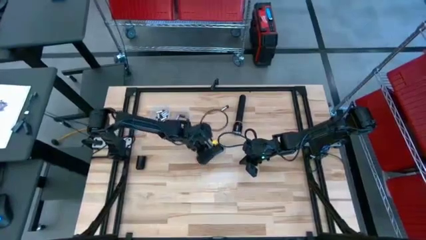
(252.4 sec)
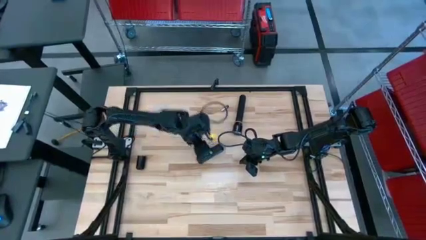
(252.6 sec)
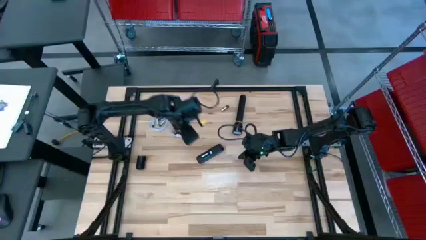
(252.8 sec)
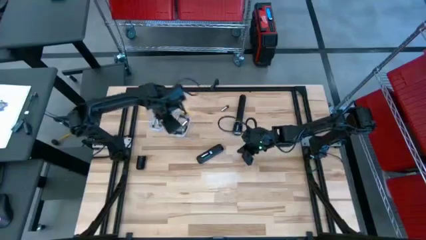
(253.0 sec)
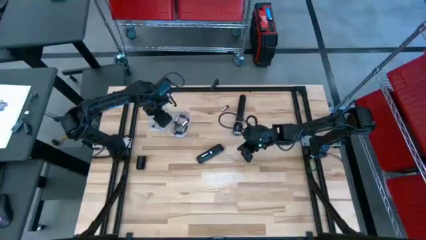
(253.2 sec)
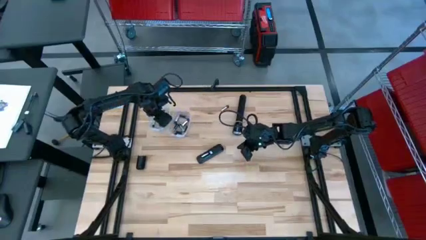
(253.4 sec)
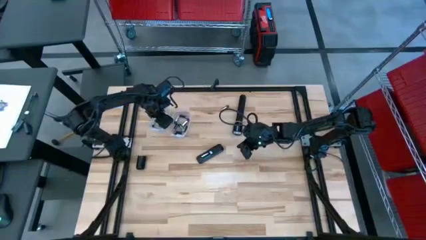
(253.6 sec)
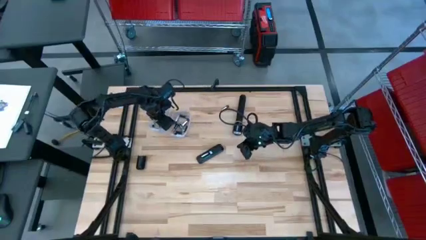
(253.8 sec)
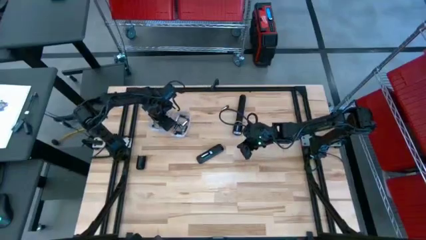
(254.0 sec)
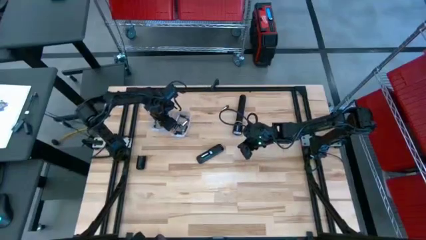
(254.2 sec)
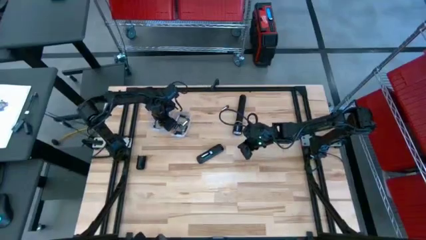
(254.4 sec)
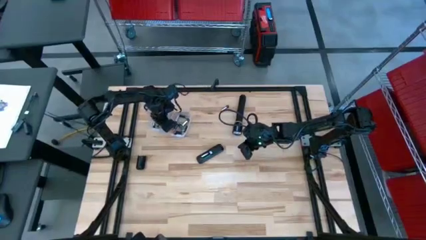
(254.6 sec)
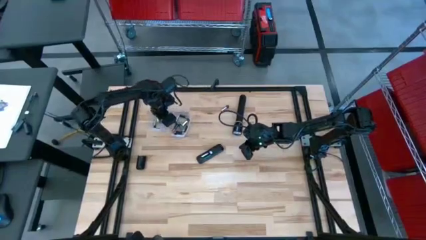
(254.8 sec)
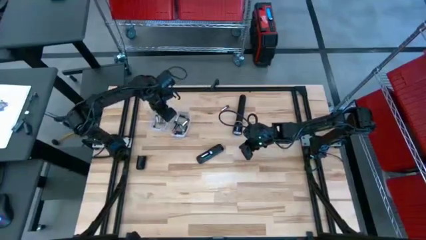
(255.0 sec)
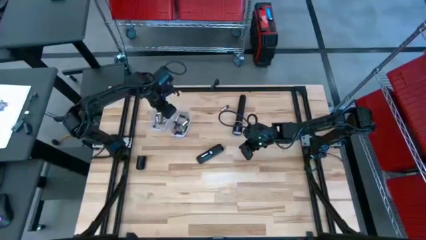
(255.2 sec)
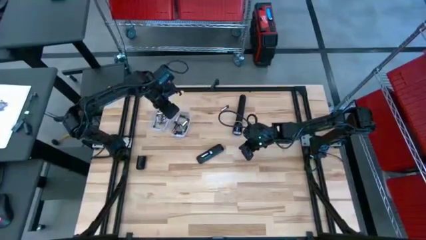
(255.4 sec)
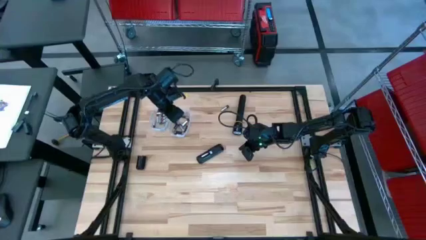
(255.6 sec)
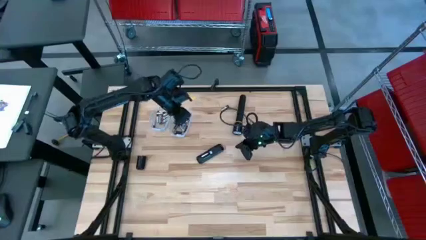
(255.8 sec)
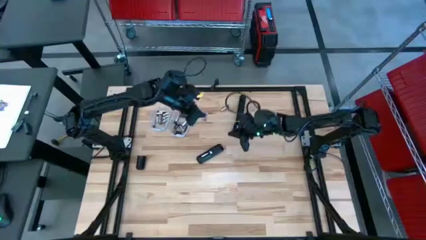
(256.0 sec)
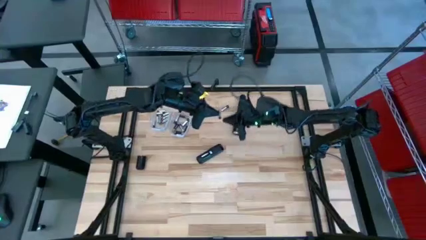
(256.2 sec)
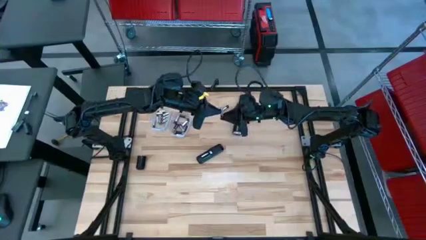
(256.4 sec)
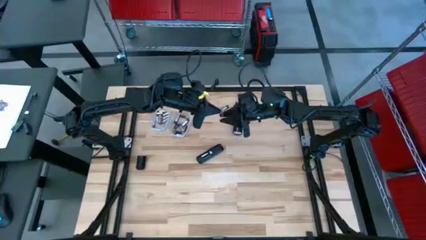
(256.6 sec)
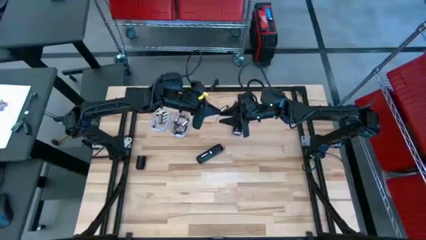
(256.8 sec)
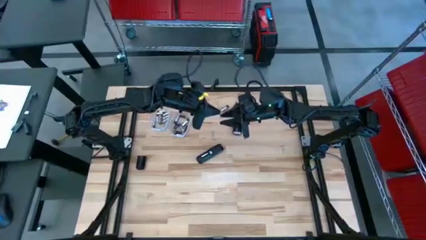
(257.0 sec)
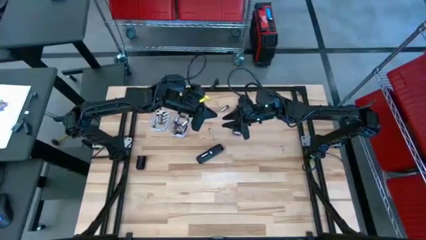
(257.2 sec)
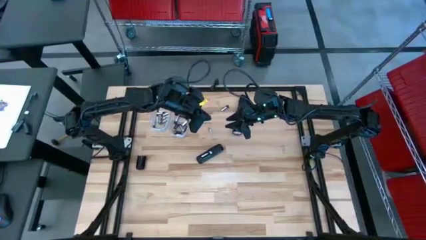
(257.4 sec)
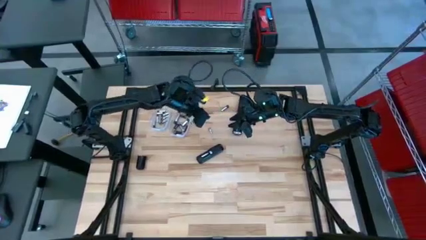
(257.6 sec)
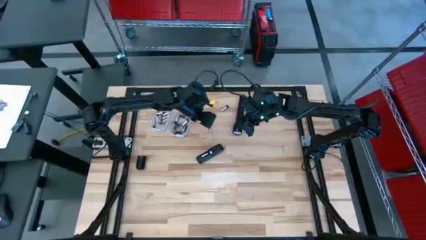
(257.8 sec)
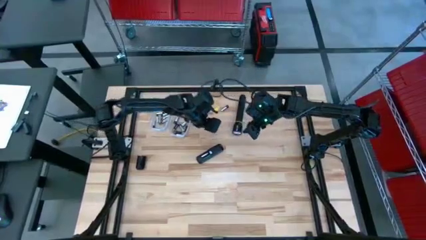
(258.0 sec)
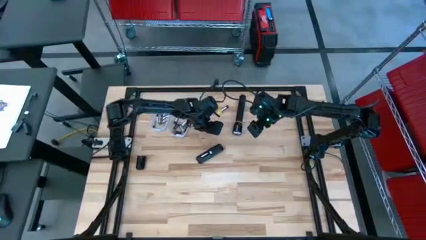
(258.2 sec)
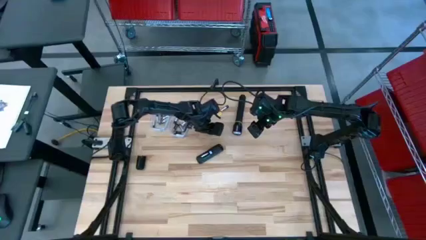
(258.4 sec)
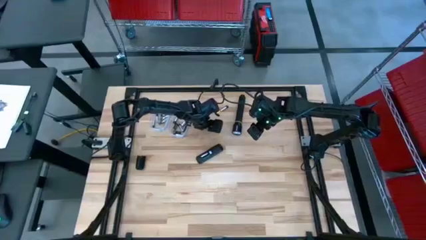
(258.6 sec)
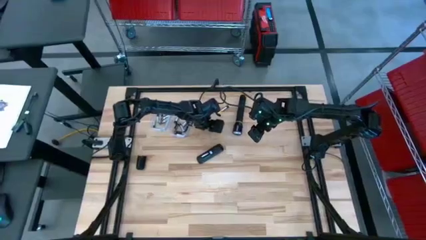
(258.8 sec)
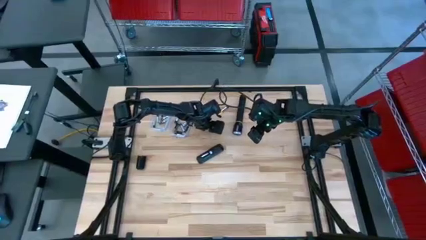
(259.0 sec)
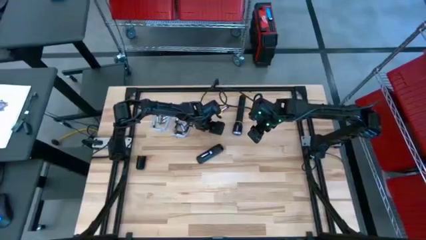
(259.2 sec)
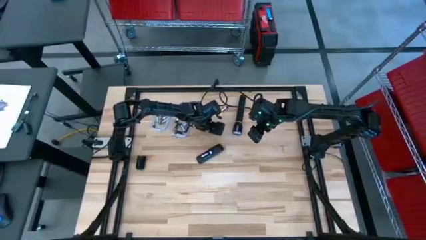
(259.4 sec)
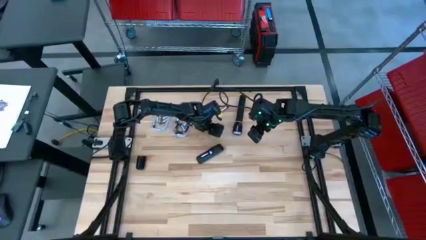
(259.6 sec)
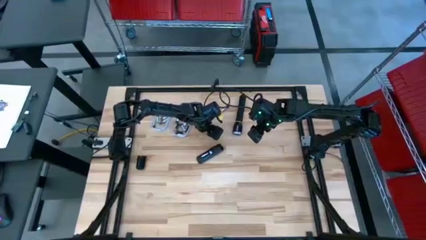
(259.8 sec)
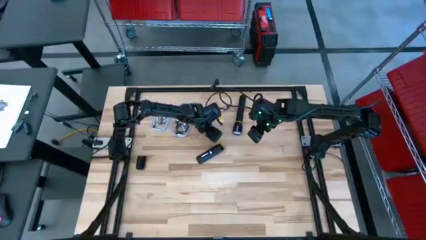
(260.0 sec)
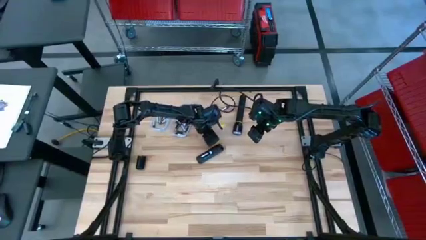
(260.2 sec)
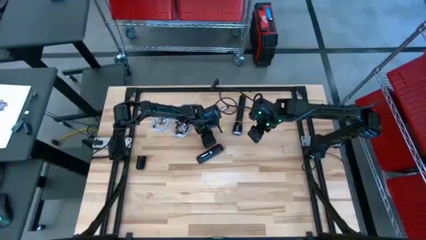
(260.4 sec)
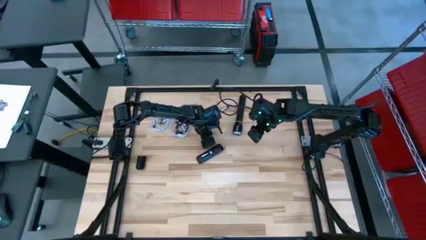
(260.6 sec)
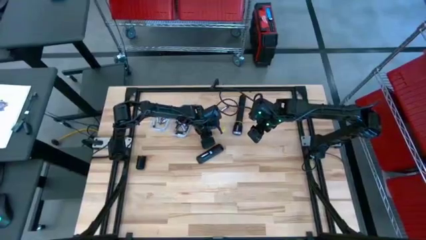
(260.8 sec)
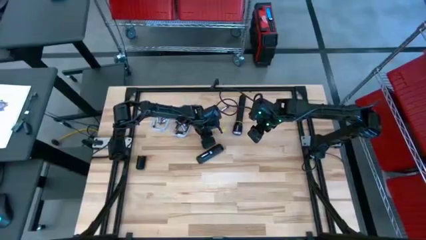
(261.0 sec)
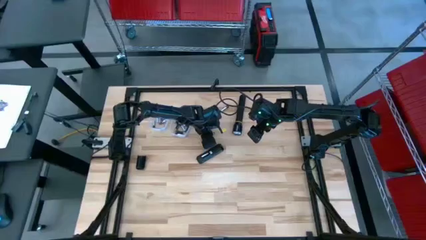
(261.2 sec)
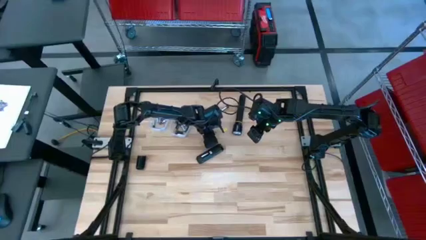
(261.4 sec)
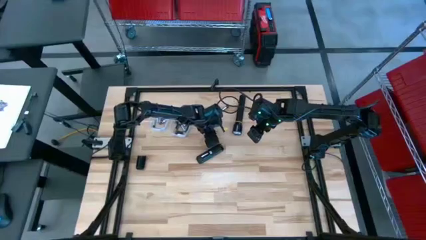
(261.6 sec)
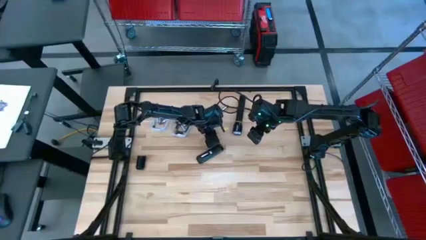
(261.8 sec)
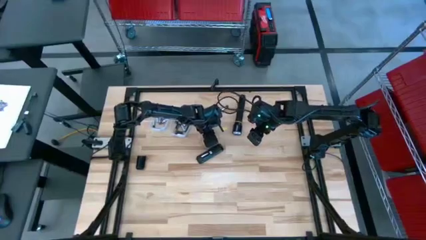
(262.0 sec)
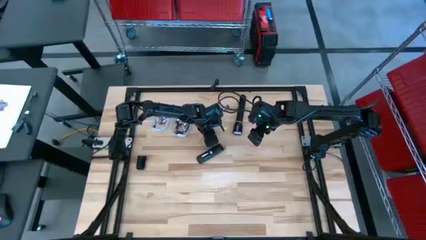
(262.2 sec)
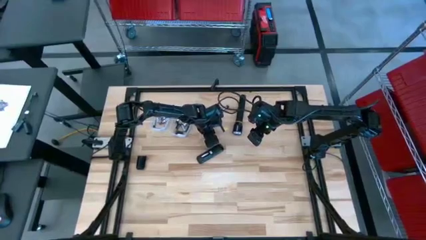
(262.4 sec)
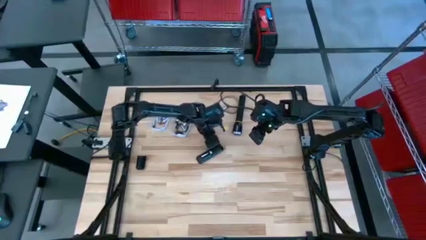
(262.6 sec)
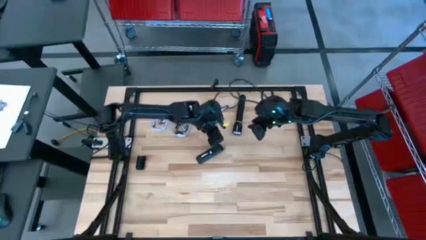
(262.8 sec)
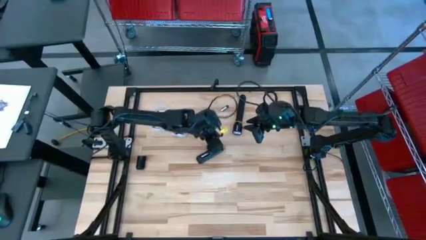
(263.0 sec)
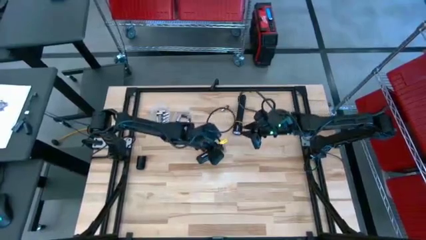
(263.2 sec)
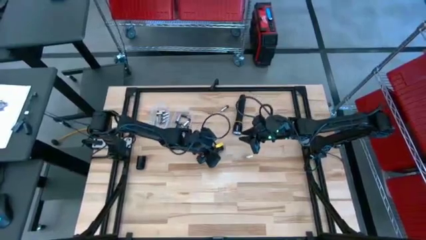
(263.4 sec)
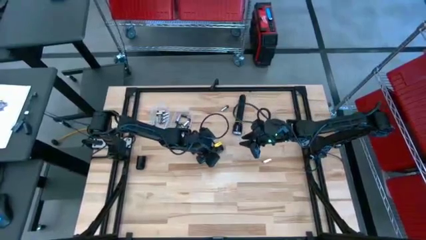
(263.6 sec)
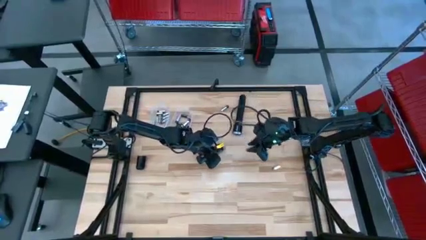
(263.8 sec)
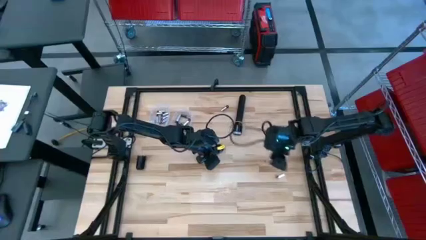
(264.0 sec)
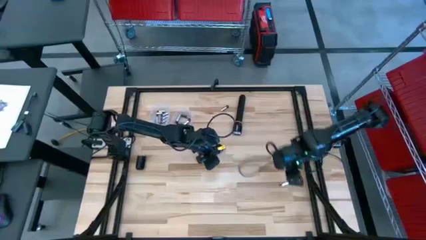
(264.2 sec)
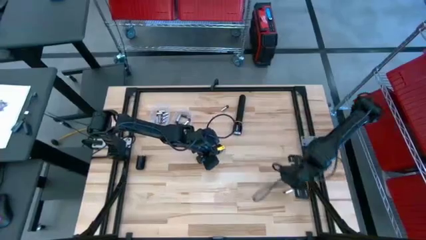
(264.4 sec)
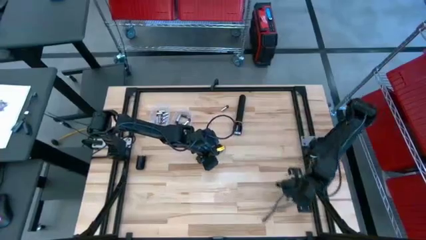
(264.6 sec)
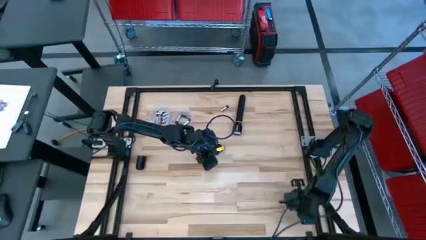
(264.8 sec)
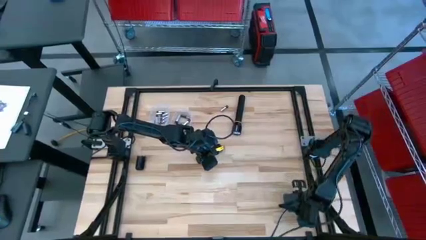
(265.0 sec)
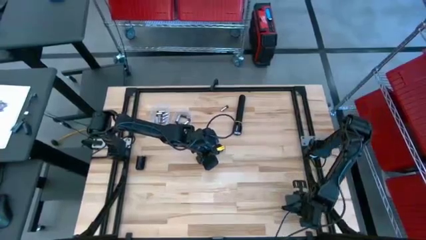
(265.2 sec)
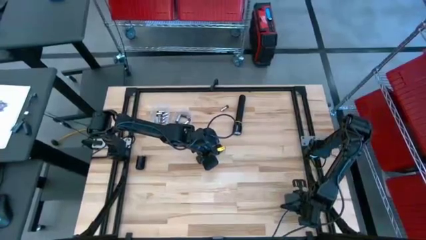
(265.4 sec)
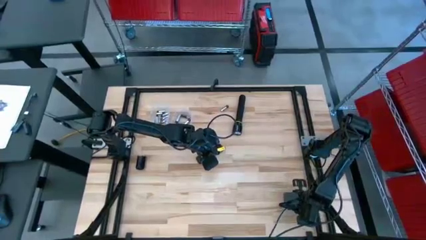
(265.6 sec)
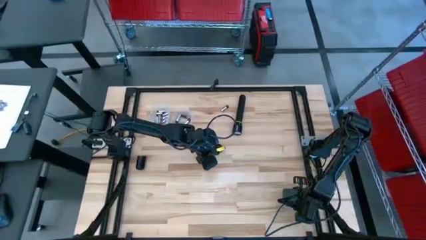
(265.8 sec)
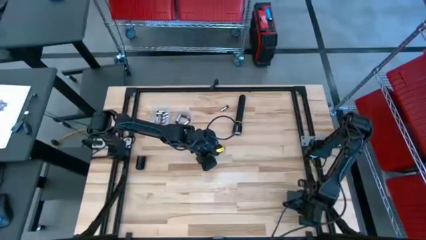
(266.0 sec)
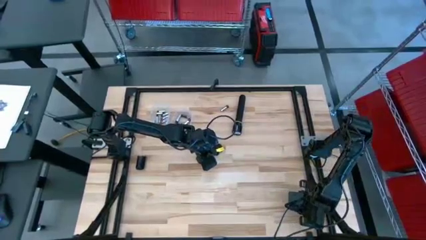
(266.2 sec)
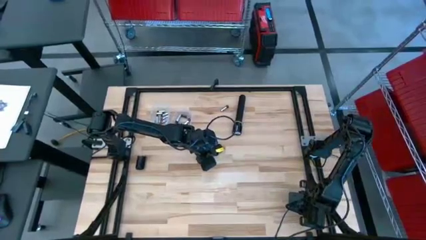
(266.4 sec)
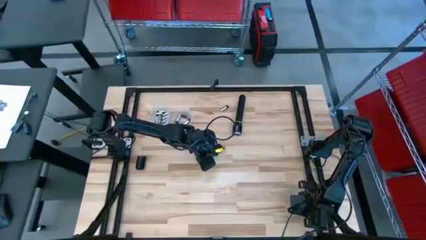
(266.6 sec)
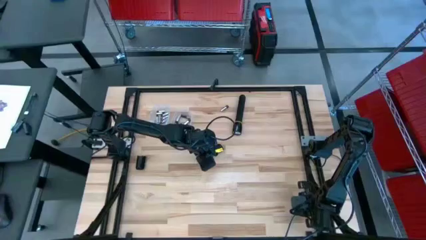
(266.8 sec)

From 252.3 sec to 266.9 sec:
Task: Insert battery
Insert the silver battery into the remote control battery compartment

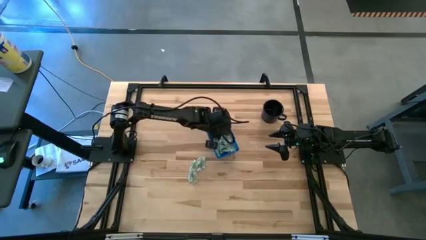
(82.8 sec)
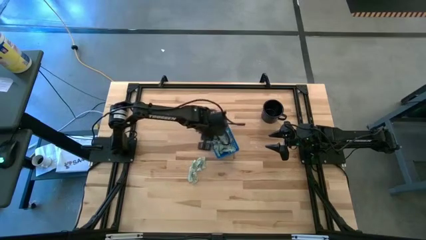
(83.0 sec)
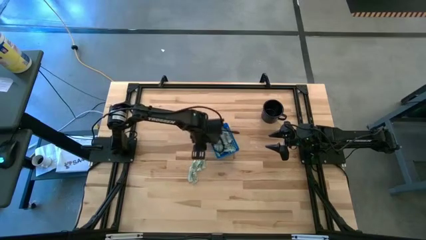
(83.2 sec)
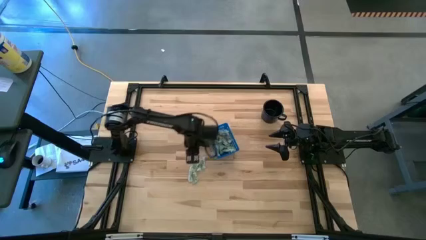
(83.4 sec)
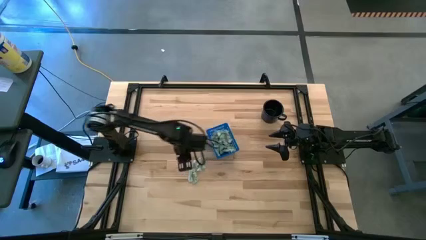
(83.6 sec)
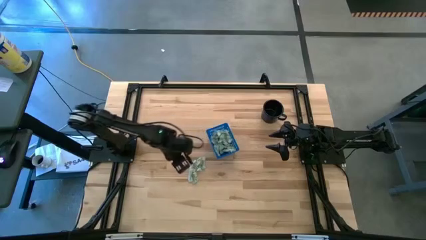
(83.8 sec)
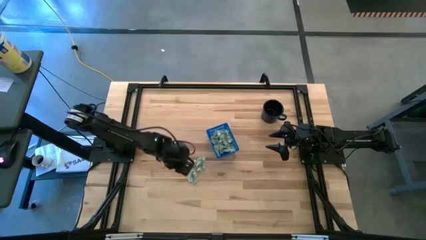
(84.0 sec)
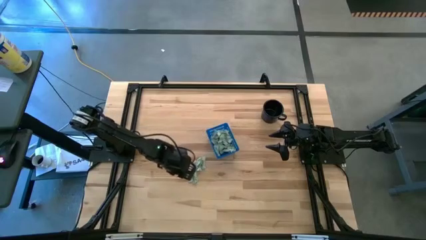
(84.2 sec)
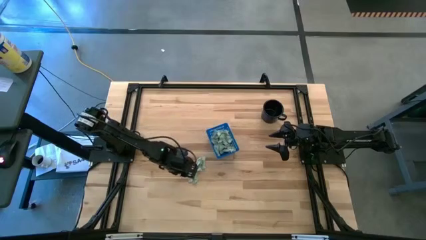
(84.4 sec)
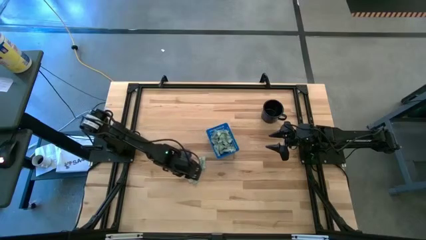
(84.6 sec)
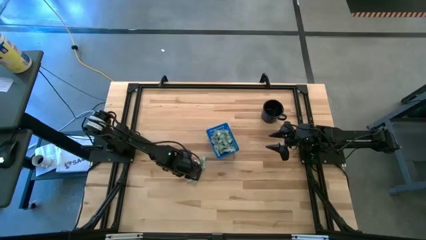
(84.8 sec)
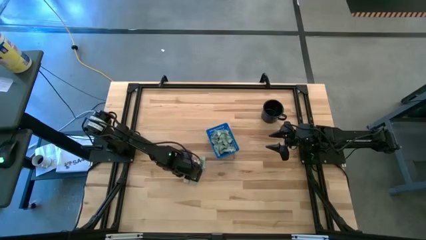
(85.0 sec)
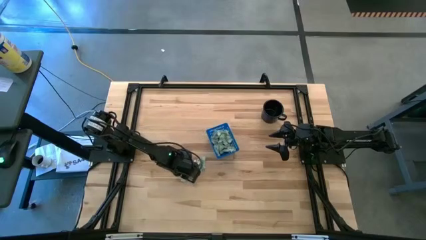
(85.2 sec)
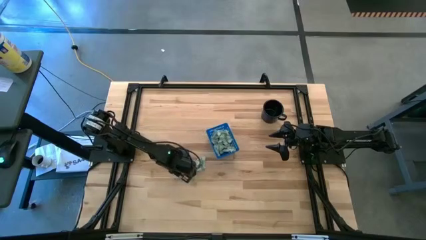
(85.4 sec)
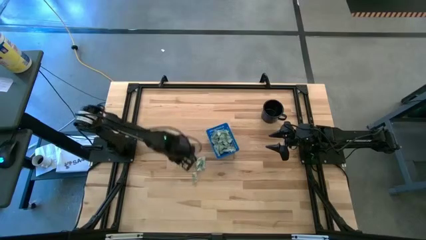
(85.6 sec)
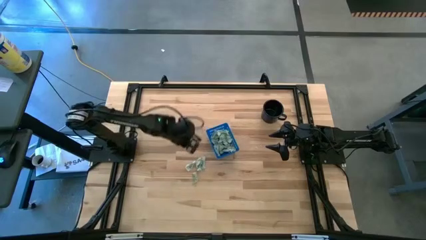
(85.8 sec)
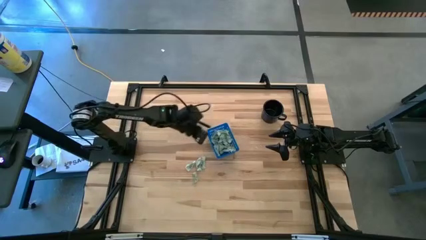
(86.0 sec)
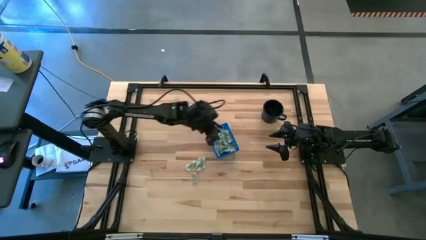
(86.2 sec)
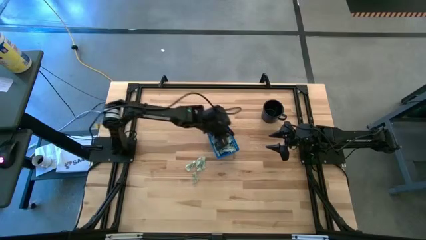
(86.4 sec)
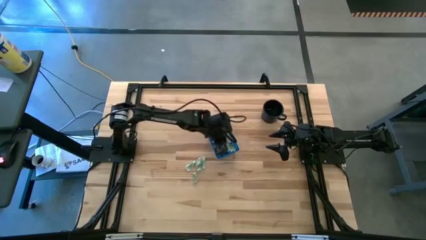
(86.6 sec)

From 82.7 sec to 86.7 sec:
Task: Pick and place Stevia / Truvia into bins
Put the stevia packet into the basket
